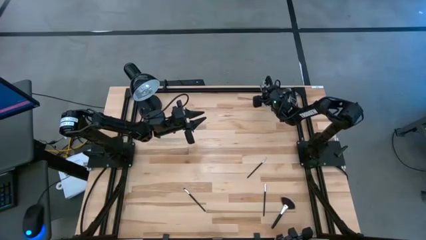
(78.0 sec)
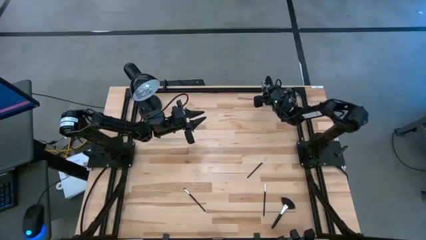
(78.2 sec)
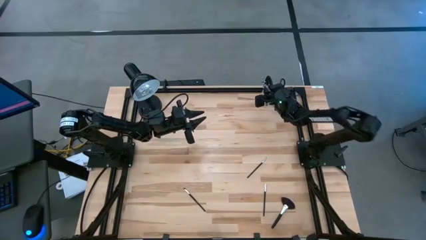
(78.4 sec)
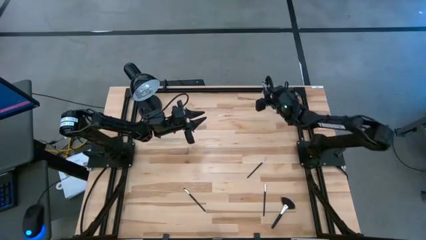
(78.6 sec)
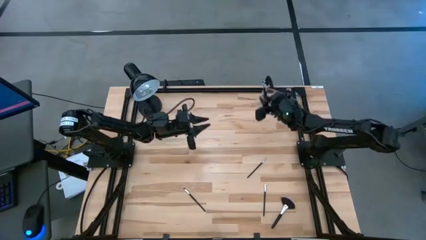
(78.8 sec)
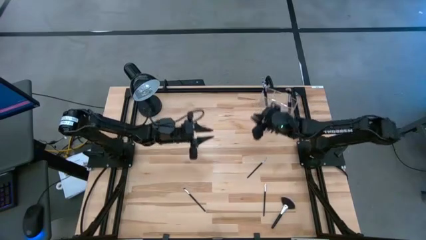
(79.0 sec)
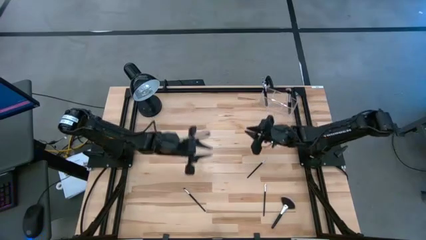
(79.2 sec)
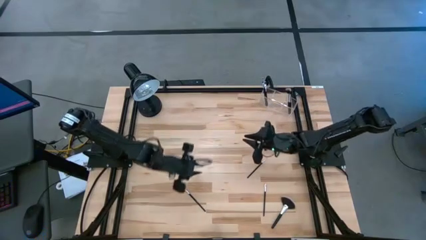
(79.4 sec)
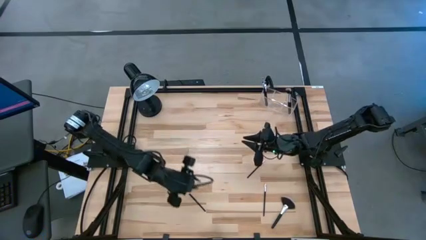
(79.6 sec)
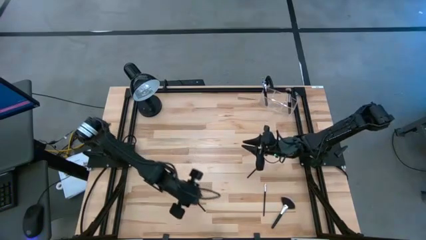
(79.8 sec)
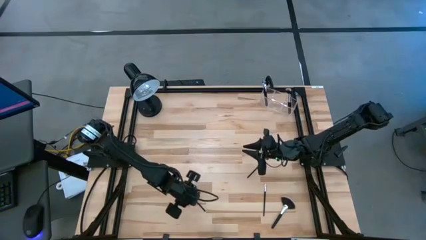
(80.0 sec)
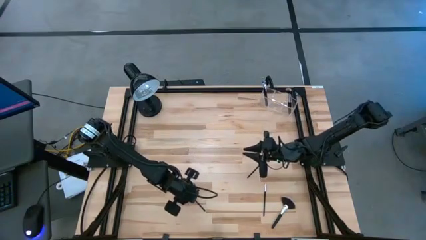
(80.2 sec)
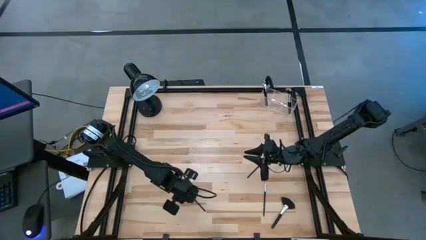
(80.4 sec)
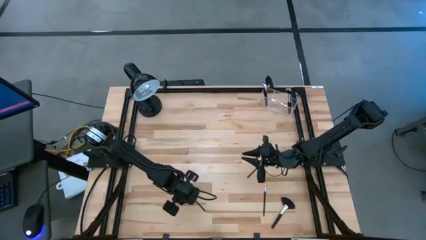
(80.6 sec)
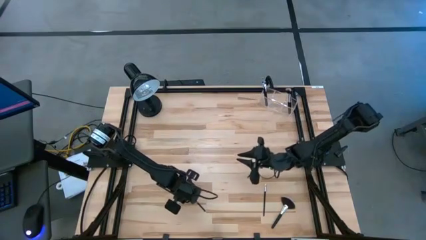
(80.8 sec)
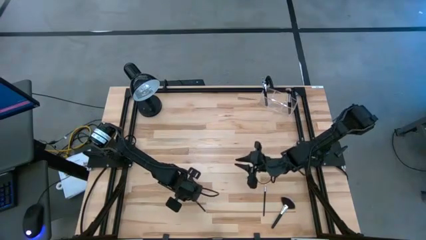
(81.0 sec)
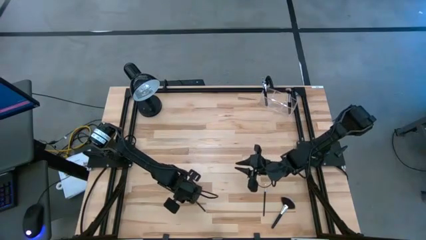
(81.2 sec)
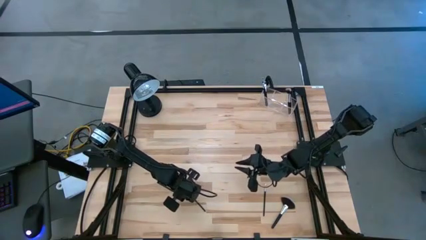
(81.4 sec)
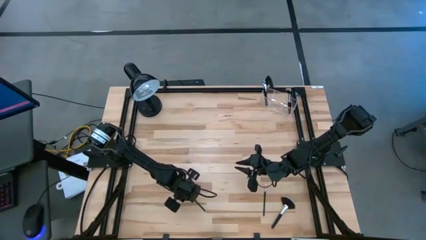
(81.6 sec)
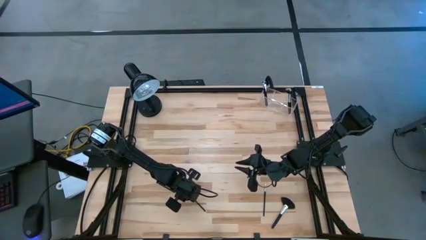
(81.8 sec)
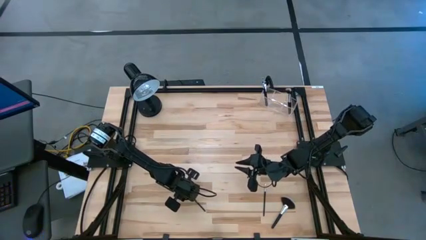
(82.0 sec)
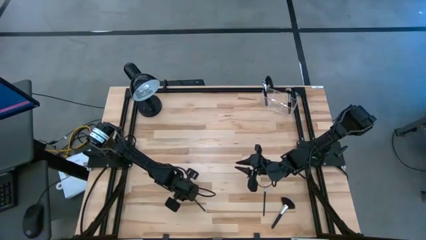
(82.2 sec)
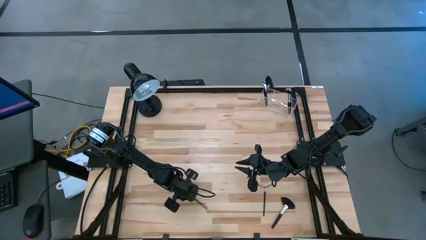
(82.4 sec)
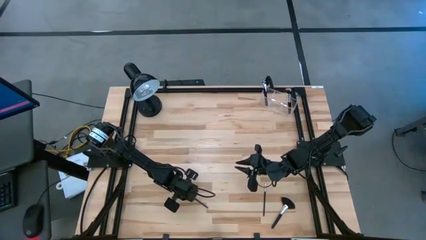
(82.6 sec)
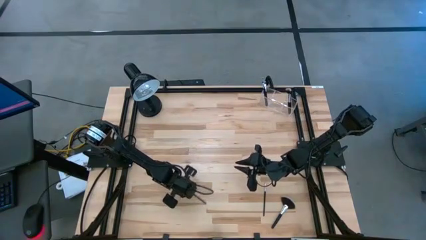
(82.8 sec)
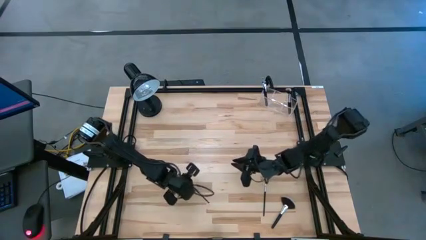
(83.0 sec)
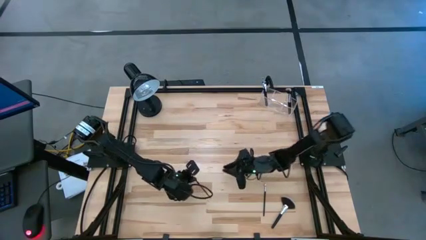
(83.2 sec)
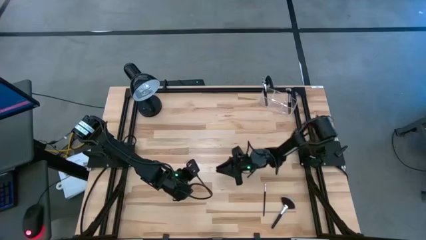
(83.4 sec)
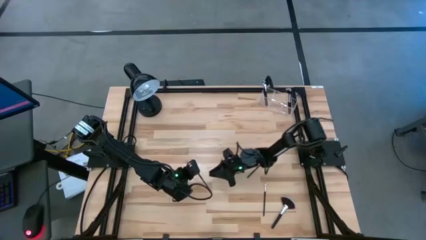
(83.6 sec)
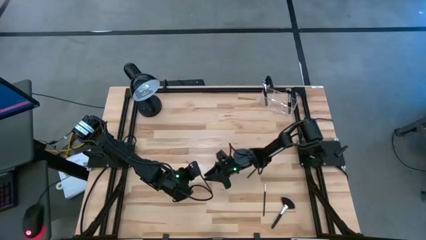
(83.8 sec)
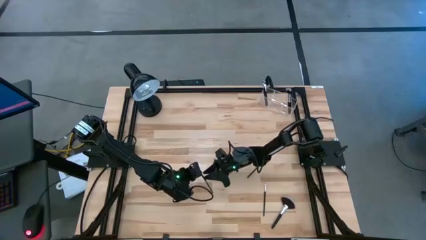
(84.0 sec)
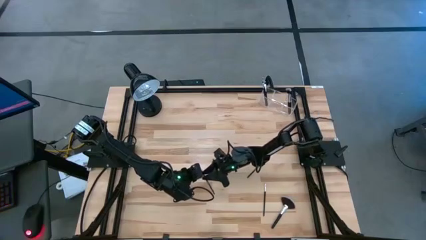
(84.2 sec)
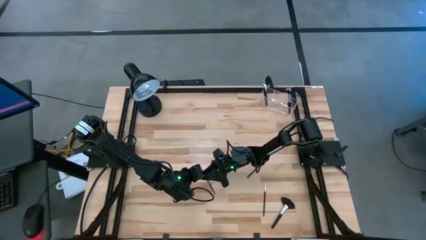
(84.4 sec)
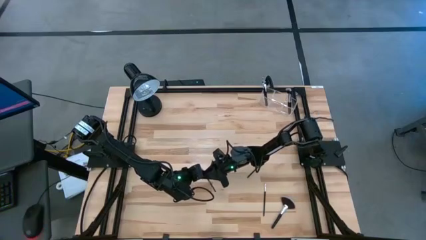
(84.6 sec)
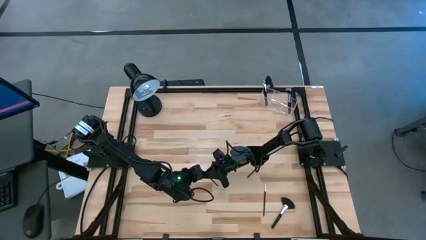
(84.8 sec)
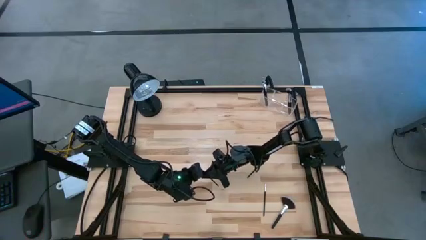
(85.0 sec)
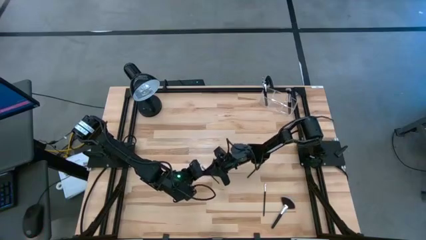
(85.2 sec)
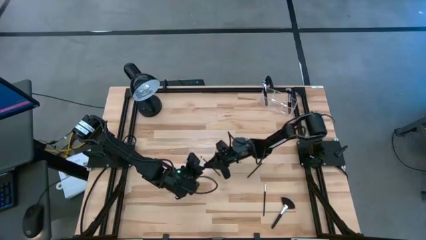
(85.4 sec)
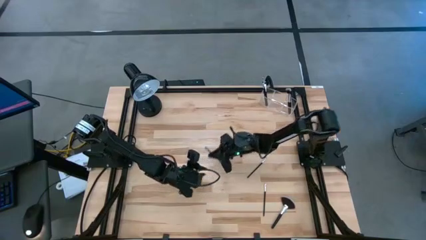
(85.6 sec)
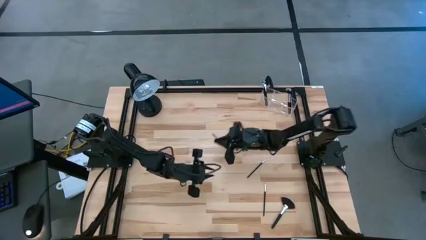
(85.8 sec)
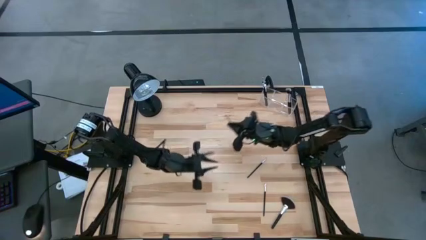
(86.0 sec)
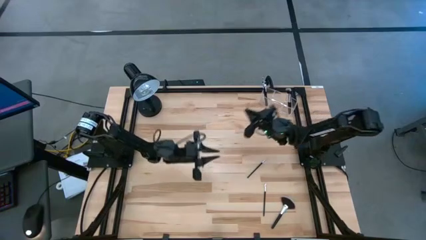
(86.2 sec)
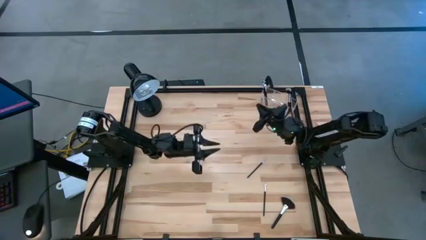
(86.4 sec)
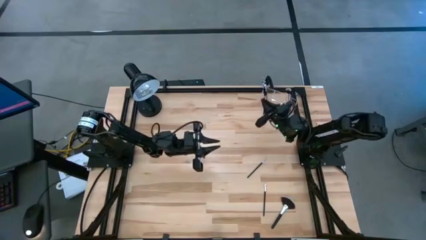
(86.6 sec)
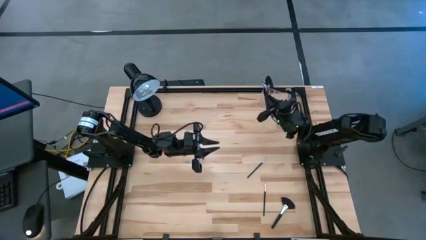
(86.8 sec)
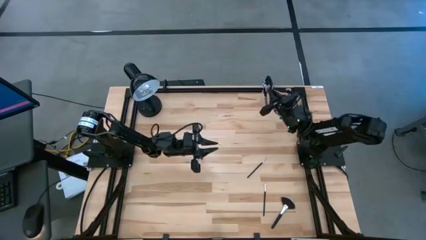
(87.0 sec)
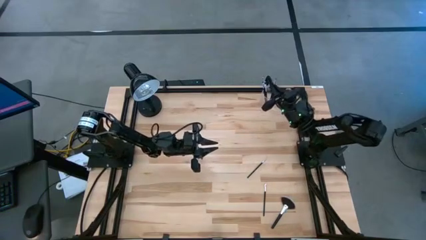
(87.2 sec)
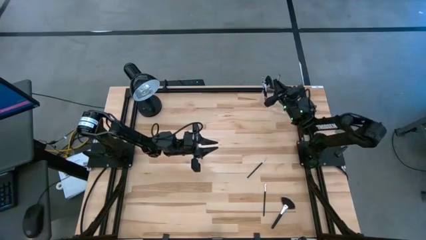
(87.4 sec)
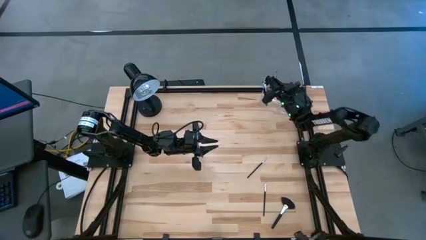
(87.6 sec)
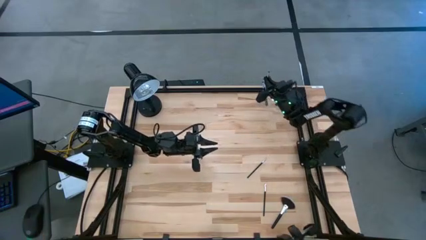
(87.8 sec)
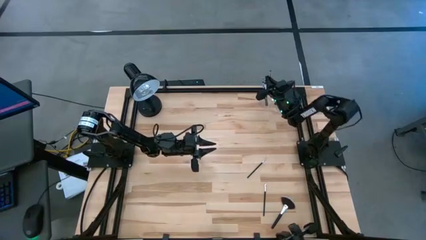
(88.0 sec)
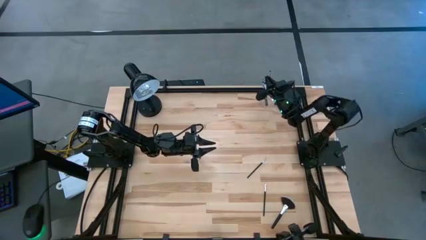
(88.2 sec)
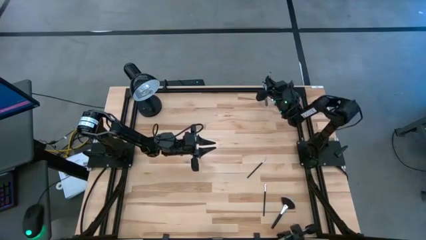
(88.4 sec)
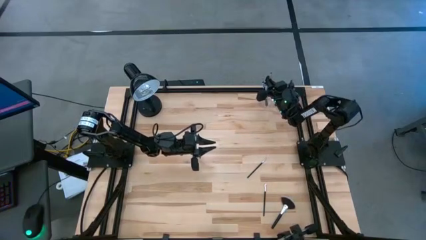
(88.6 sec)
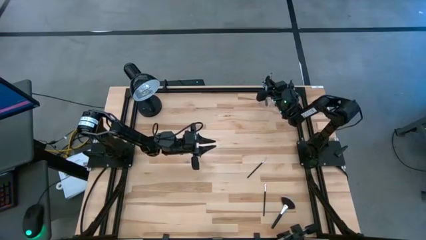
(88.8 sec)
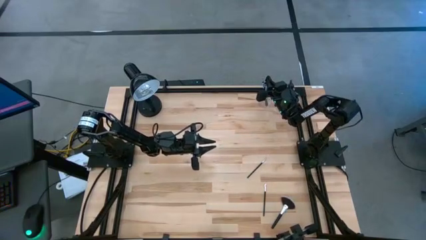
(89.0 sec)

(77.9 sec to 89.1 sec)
Task: Sort items
Put the eyeshadow brush into the transparent organizer

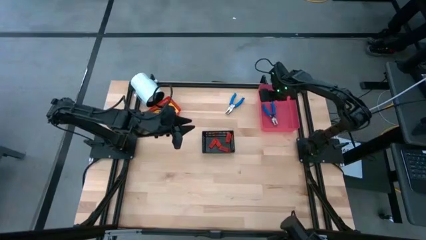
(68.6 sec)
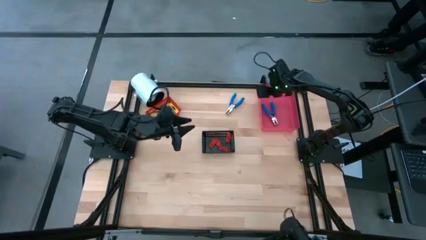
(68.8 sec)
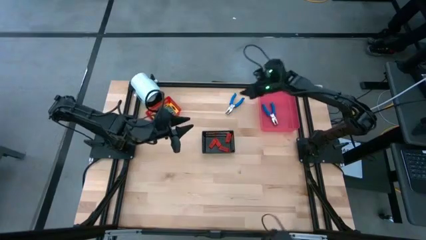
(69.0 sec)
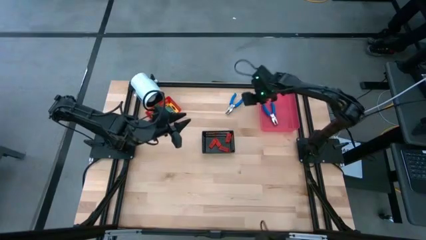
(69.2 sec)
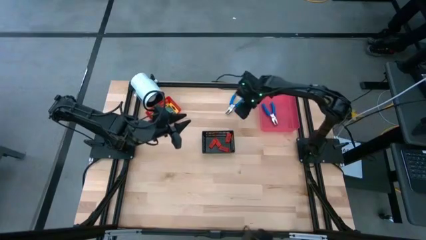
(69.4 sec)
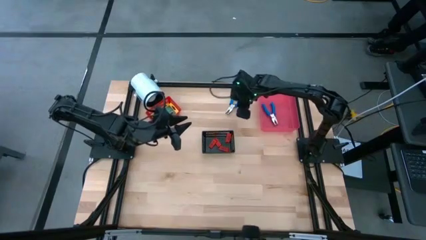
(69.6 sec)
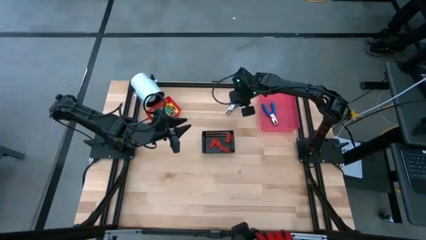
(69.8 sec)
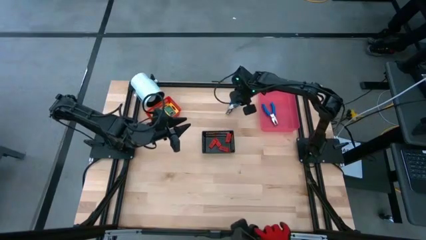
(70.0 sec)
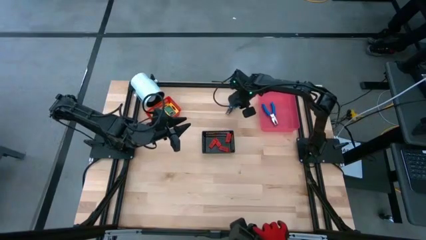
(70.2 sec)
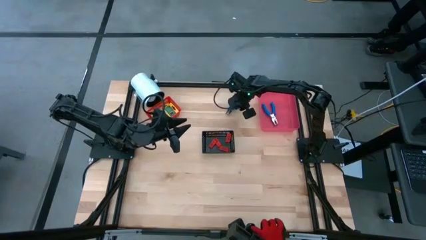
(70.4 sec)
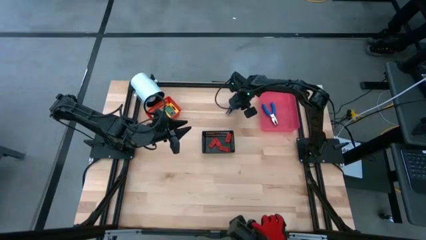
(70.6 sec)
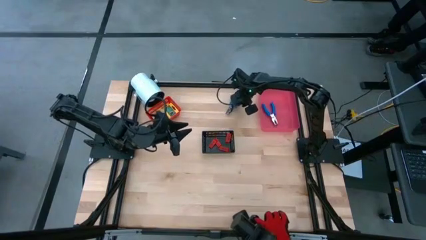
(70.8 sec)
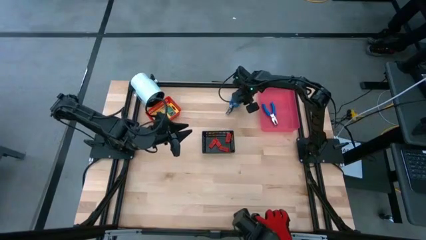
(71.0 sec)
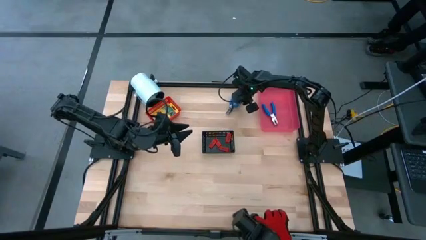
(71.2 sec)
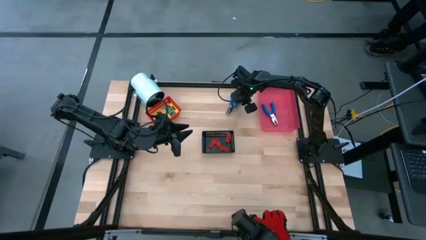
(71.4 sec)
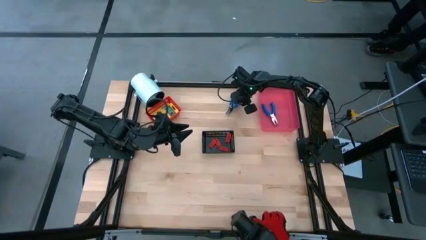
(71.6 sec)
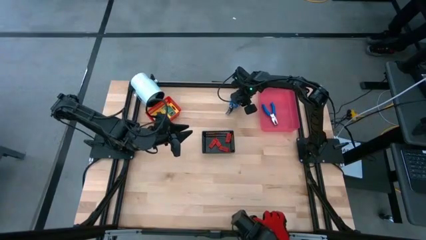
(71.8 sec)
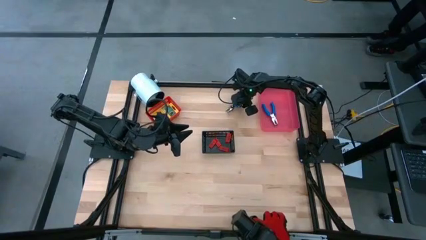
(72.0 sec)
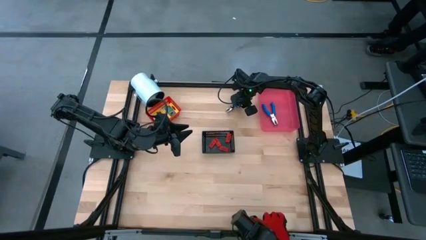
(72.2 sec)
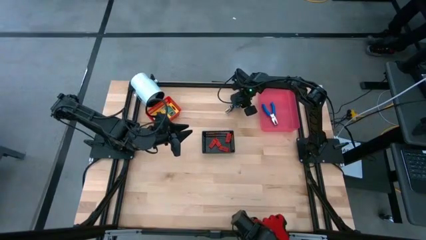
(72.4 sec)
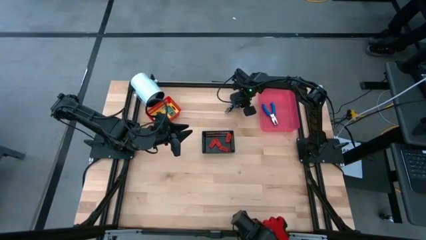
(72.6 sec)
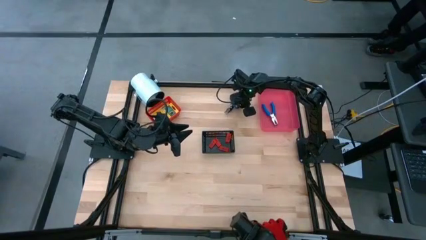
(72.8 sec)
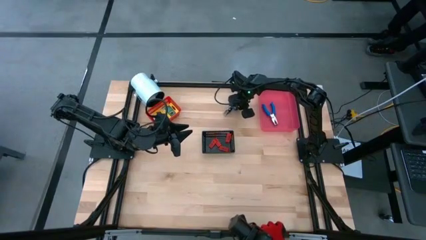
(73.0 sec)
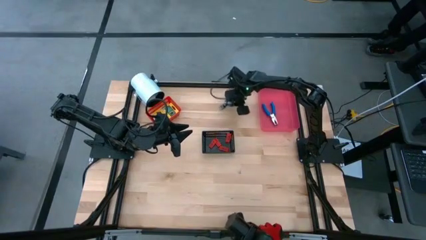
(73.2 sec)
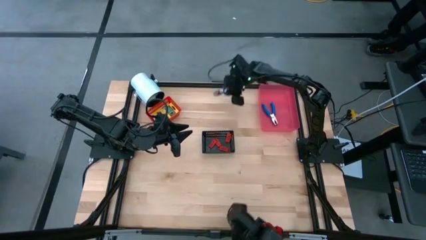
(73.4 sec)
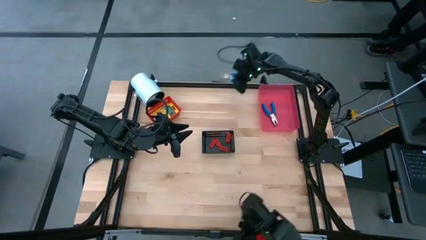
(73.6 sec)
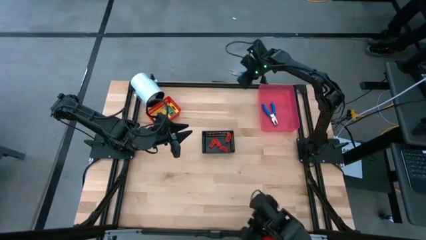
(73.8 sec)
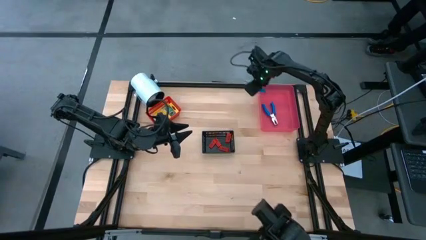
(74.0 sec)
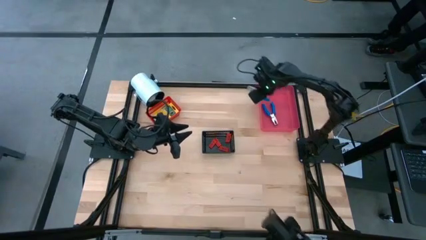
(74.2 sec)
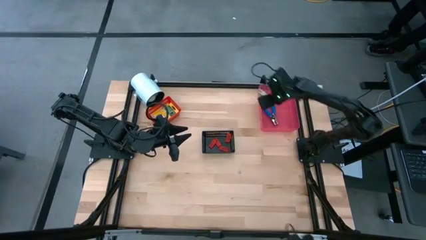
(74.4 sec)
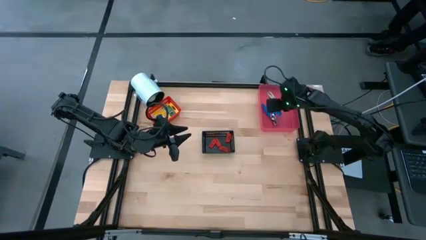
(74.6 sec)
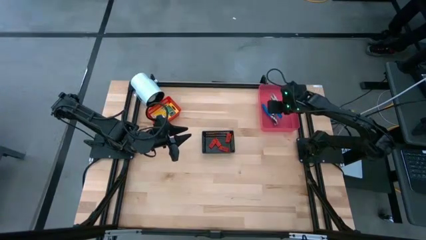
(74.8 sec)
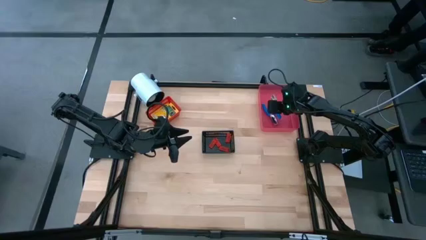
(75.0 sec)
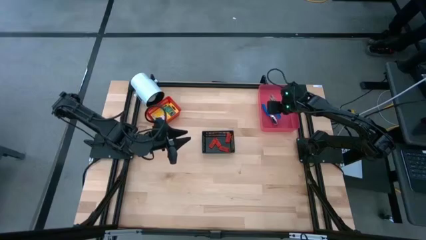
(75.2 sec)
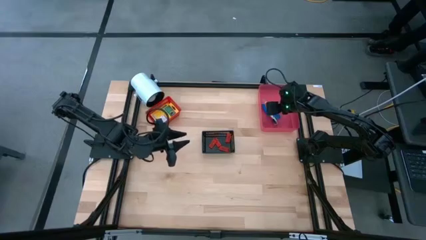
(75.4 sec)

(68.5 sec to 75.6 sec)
Task: Pick & Place School Supplies
Put the blue hole puncher into the large red bin
